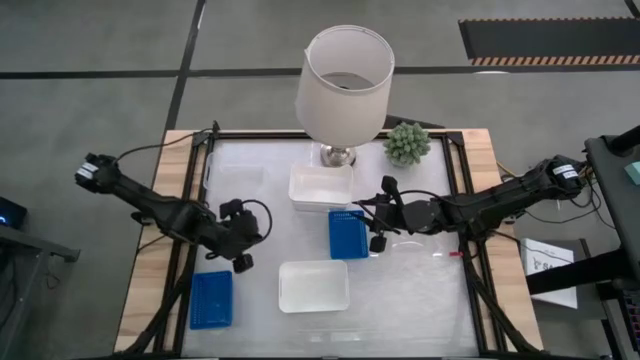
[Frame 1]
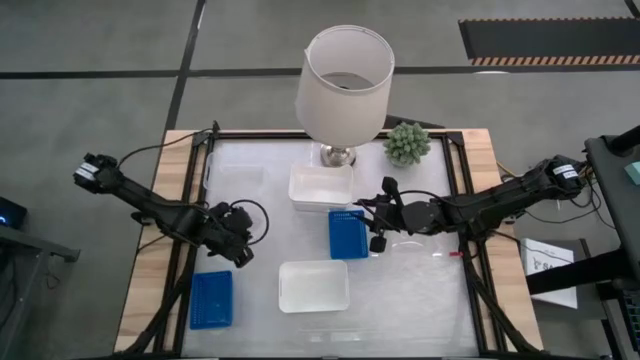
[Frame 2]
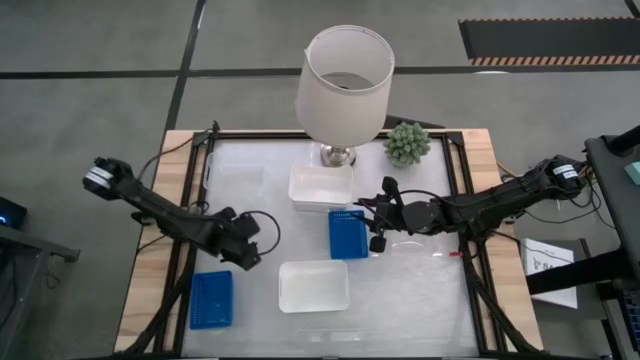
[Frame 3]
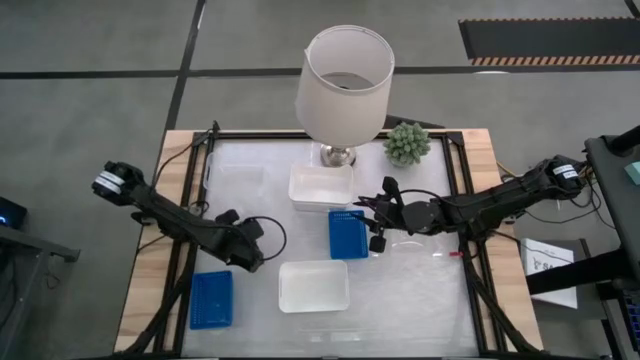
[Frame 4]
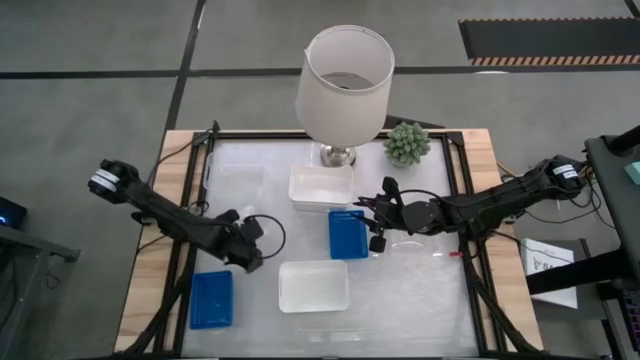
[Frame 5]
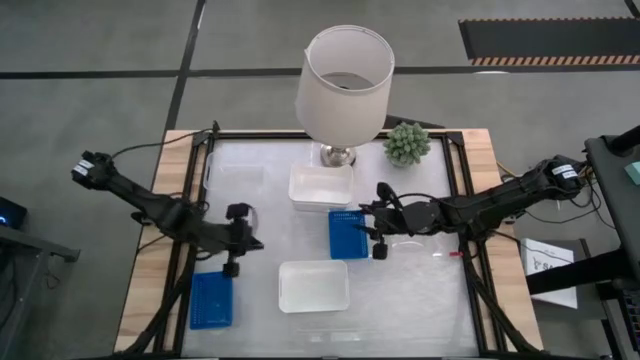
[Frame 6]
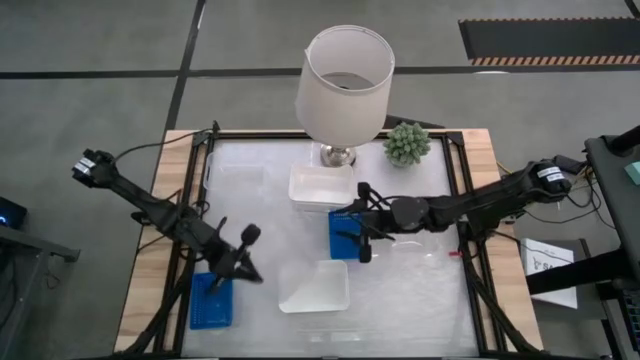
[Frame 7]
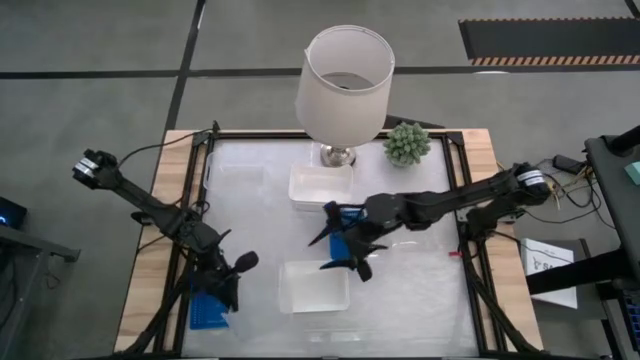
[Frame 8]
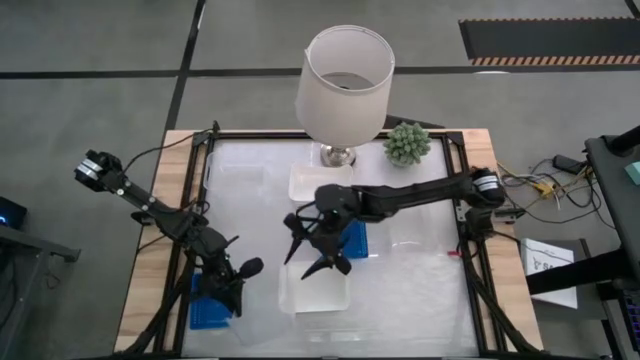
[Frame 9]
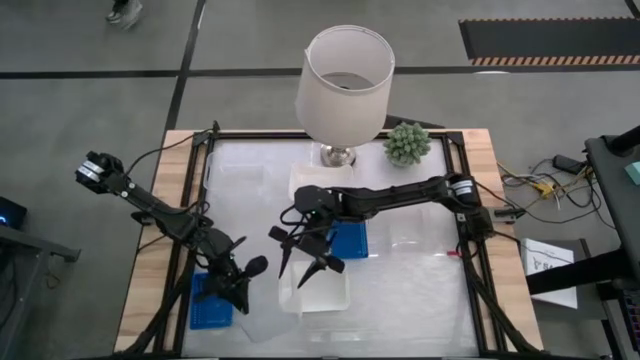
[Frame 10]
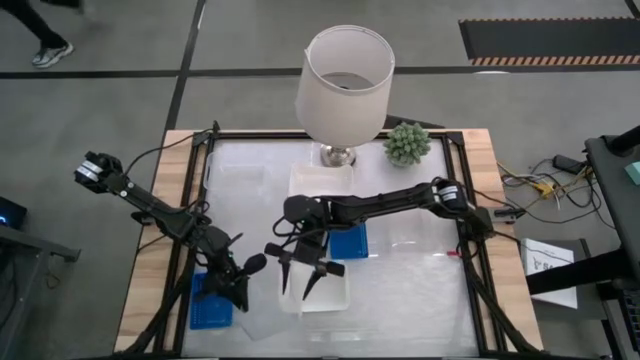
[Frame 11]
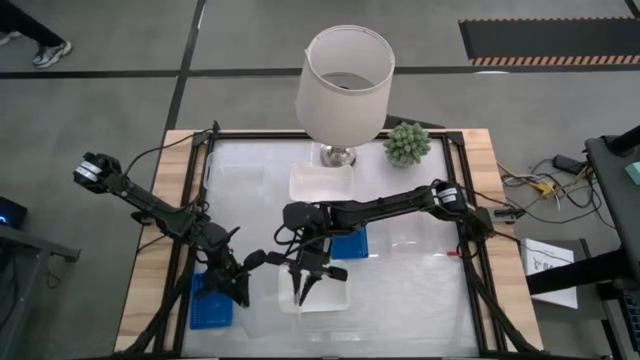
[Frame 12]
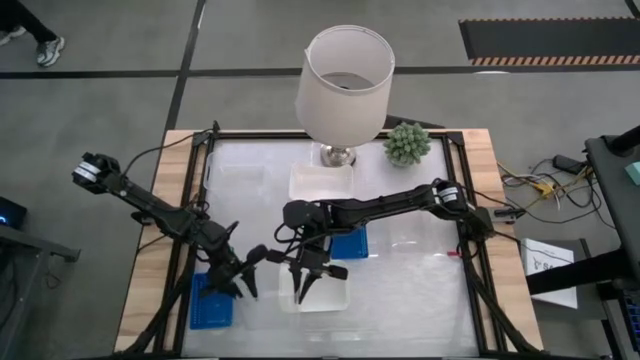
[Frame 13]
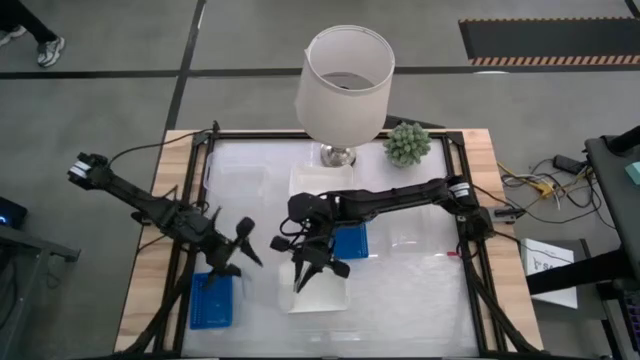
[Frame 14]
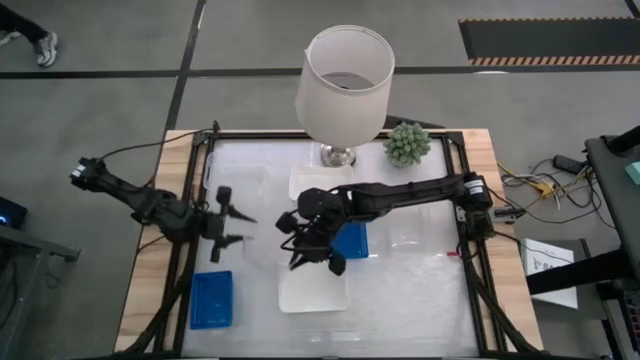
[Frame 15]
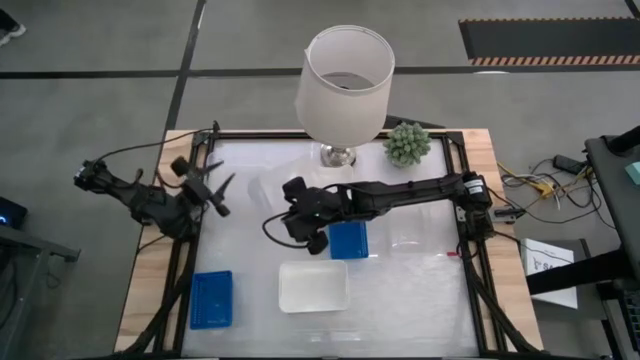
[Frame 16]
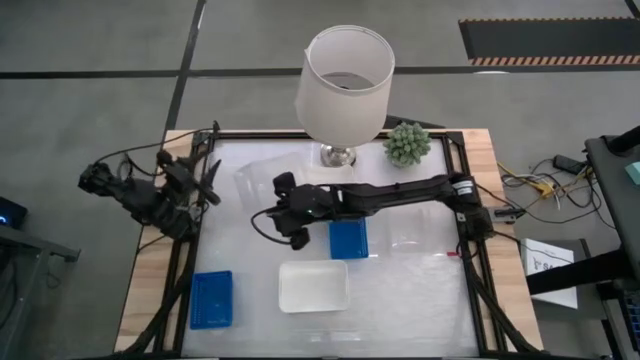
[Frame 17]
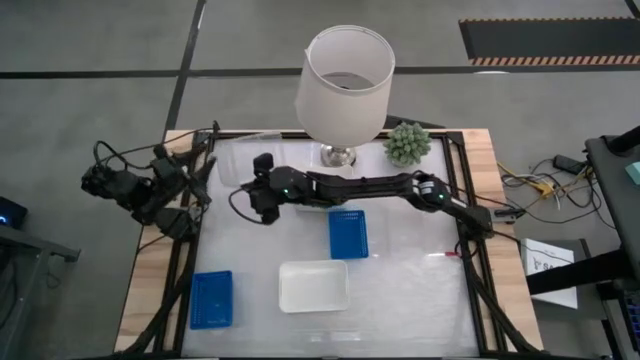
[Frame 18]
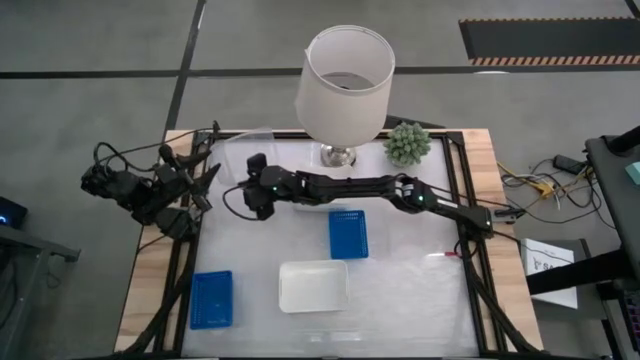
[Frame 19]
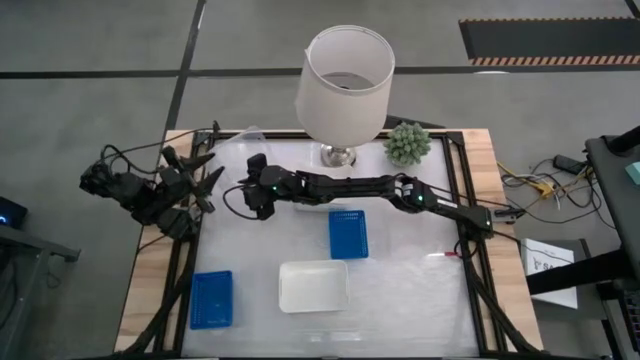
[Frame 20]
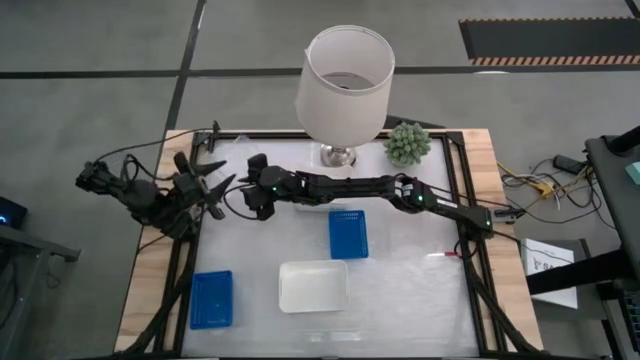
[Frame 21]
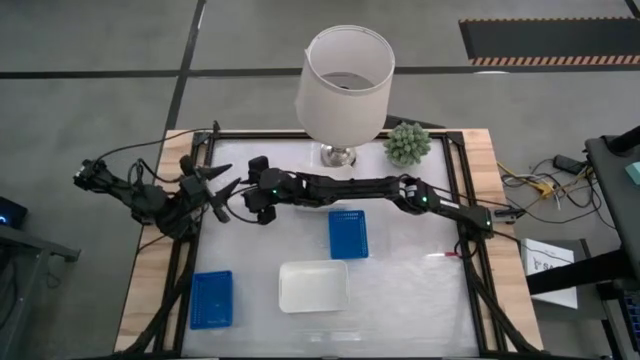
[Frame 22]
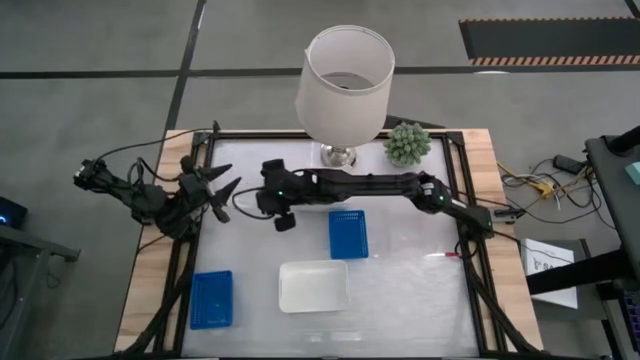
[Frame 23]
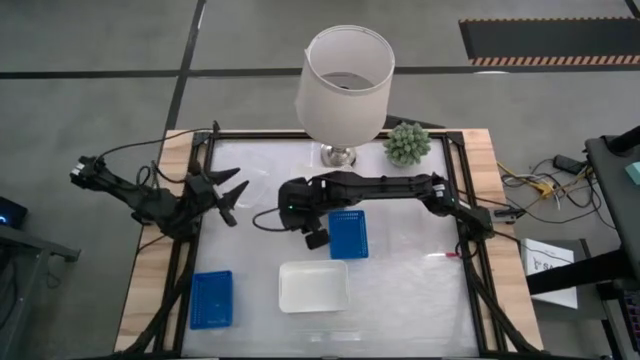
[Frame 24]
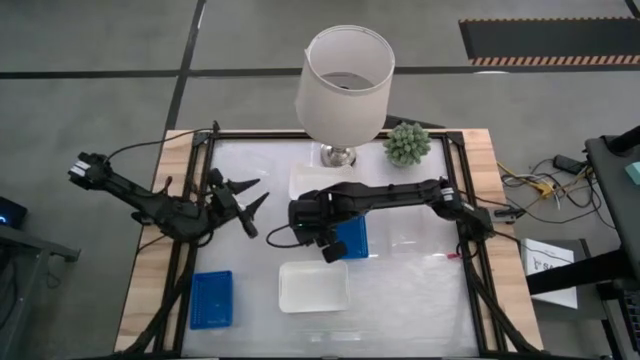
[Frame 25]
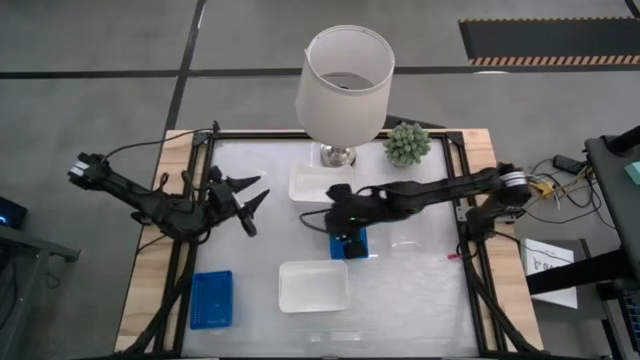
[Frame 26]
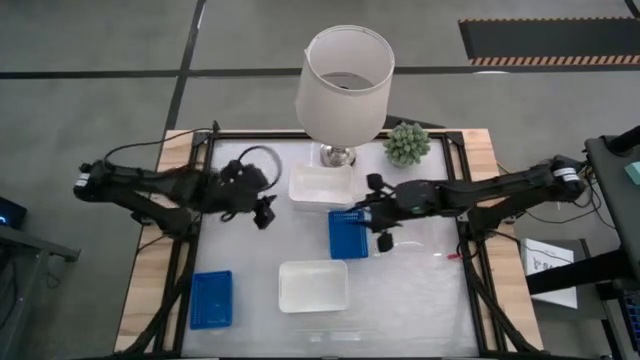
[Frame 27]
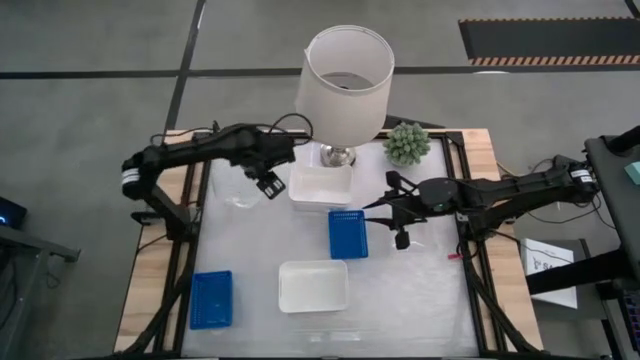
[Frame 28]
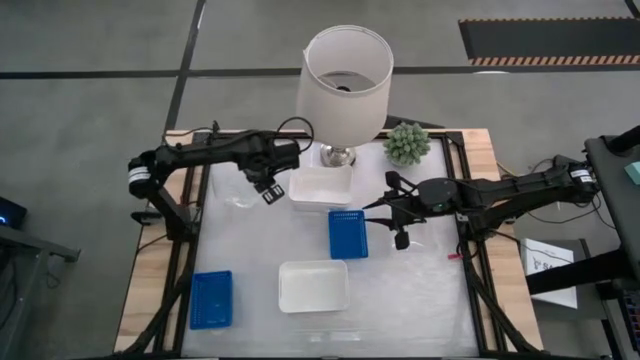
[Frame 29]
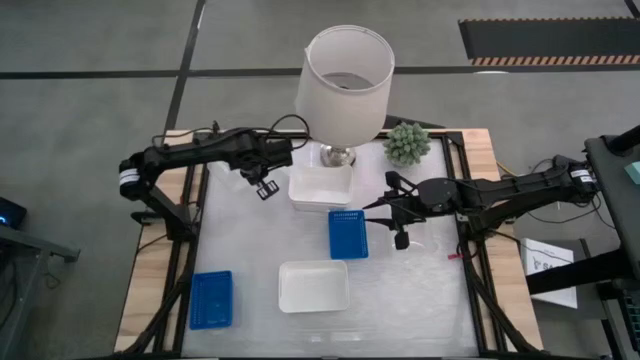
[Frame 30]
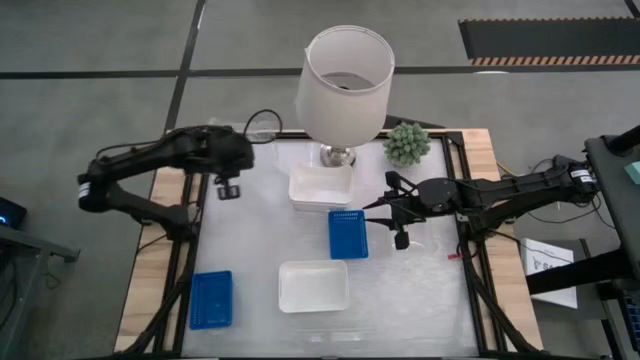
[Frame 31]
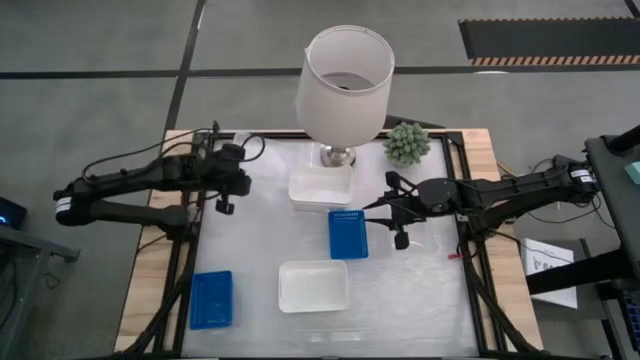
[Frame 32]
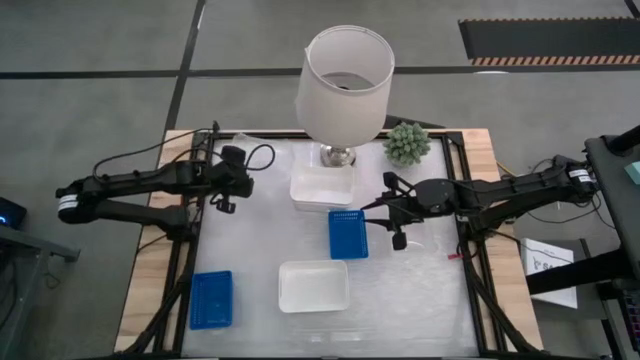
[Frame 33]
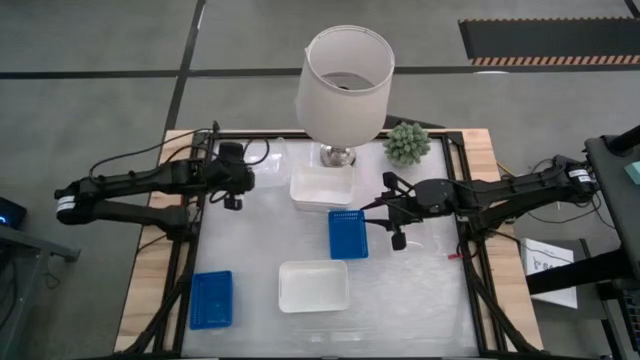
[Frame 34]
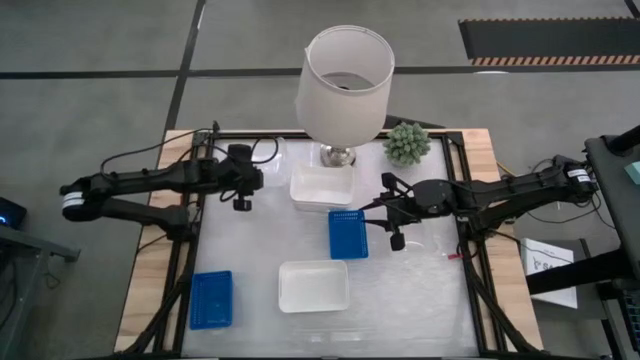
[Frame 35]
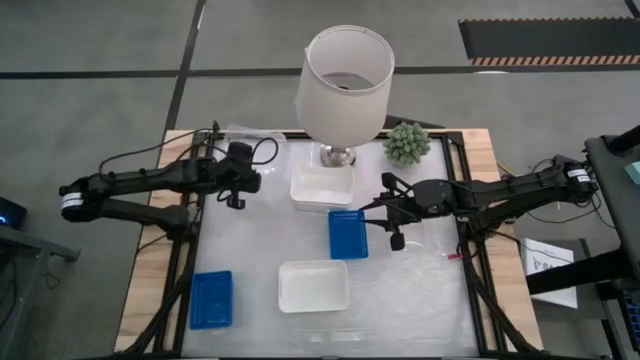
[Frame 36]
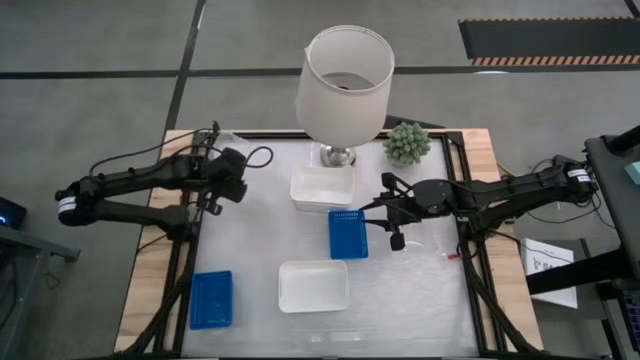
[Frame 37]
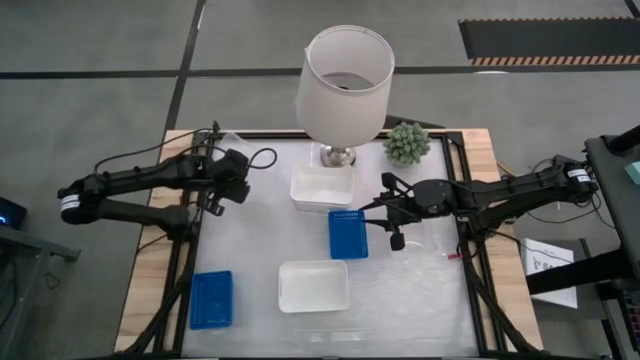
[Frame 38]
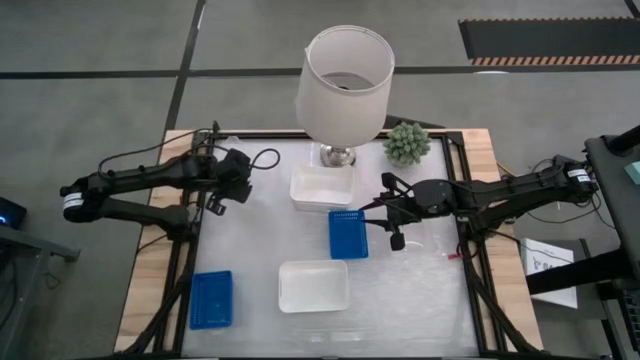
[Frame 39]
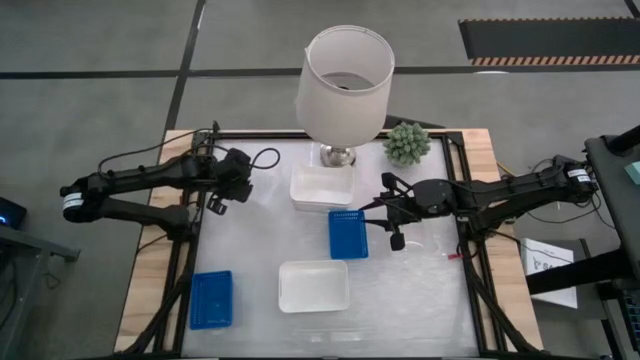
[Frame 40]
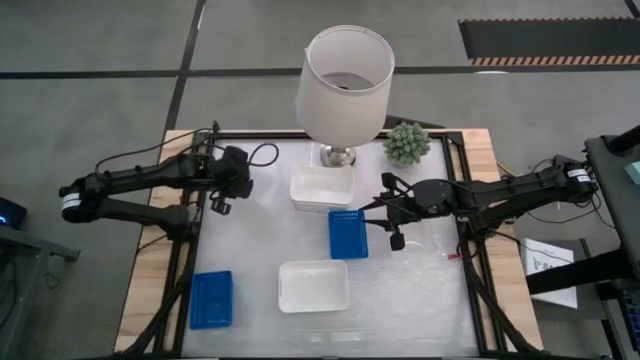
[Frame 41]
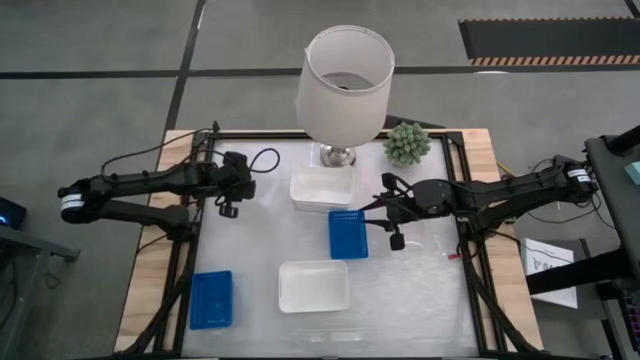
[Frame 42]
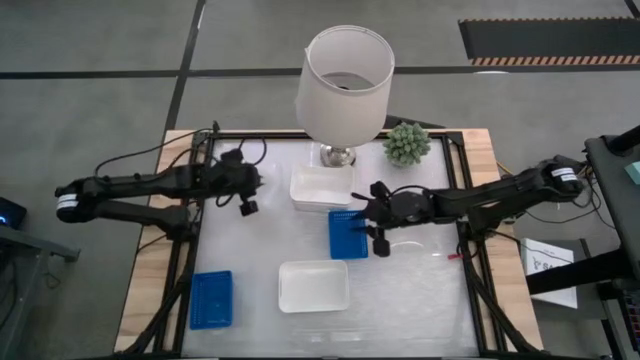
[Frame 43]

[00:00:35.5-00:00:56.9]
Stack the bottom left transparent bin into the top left transparent bin
